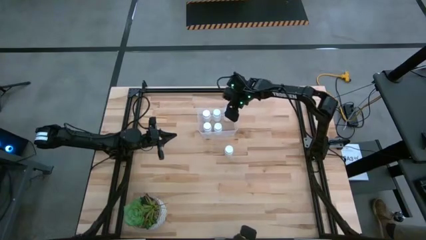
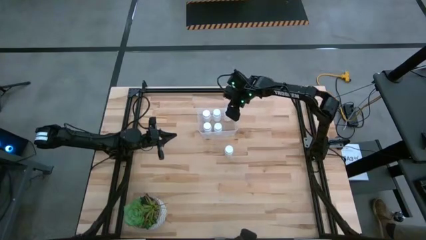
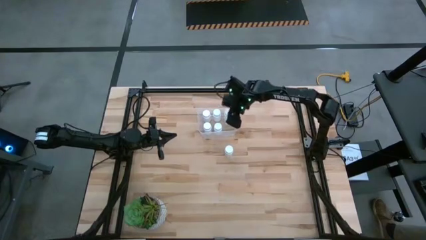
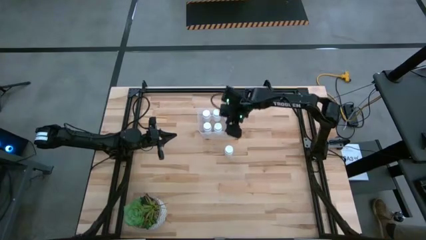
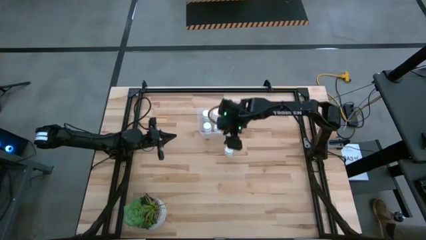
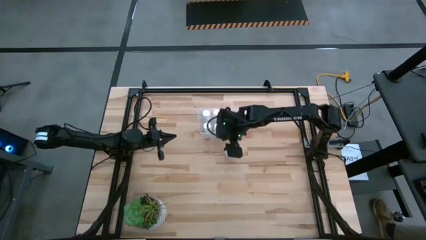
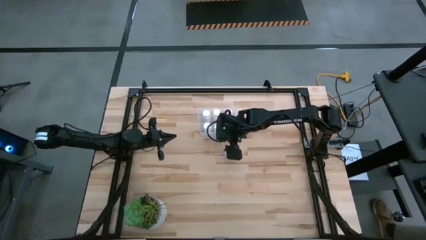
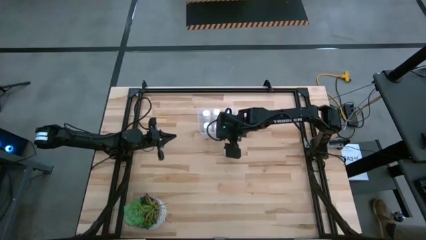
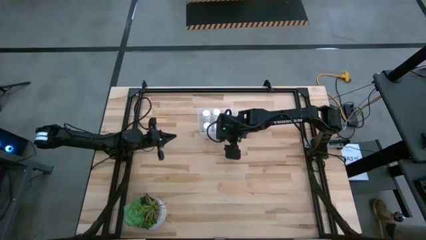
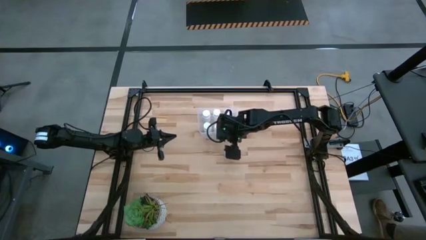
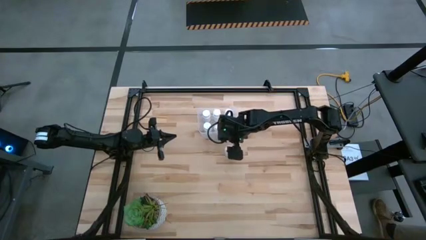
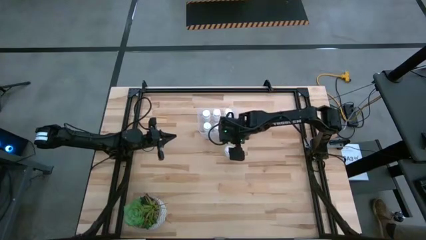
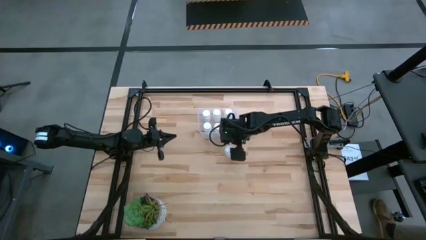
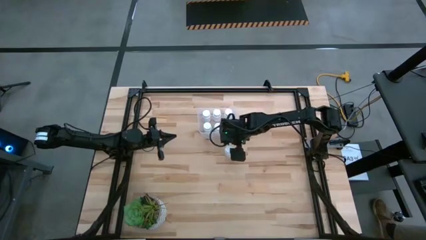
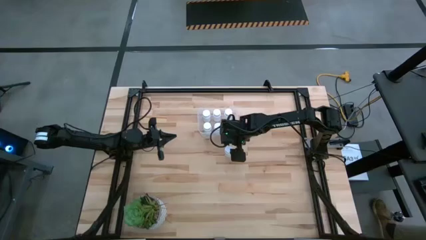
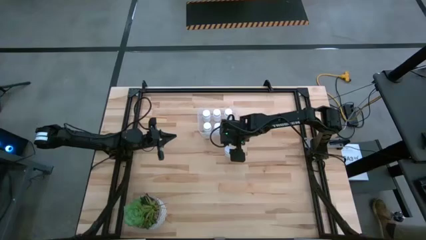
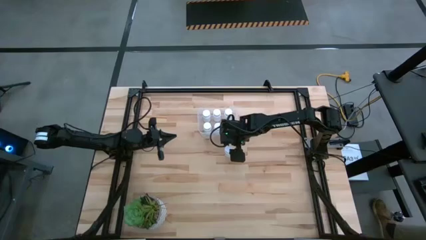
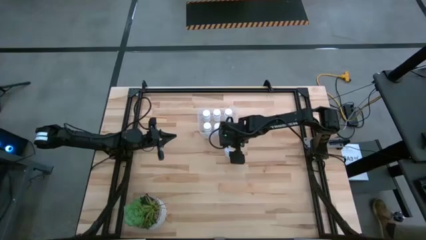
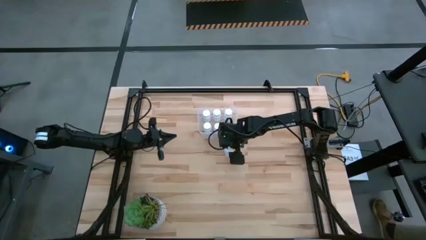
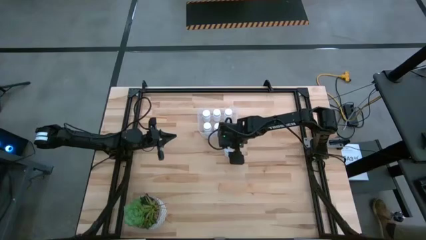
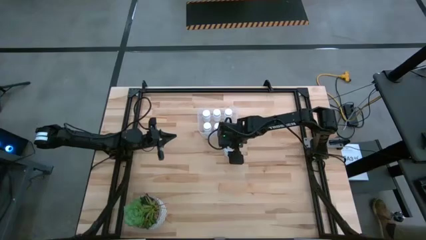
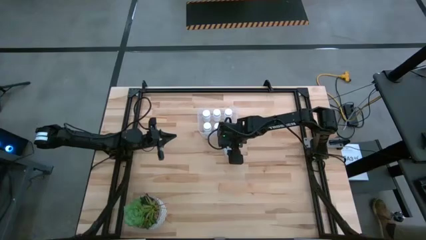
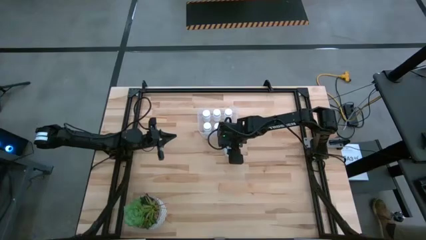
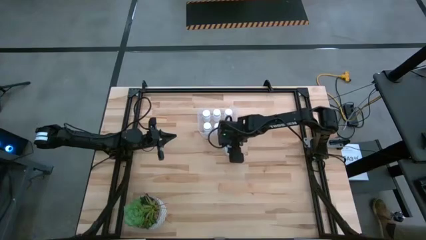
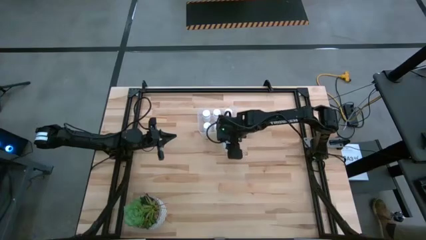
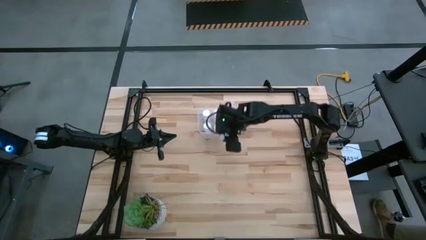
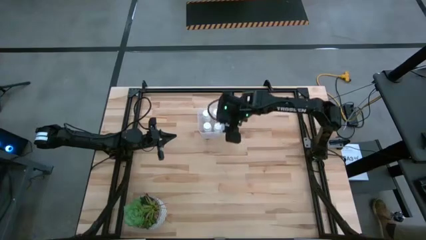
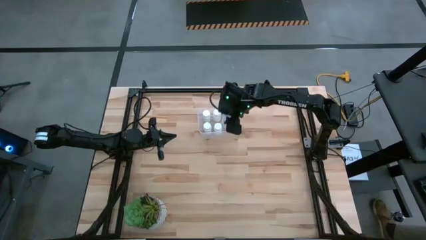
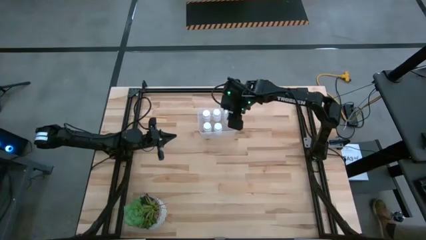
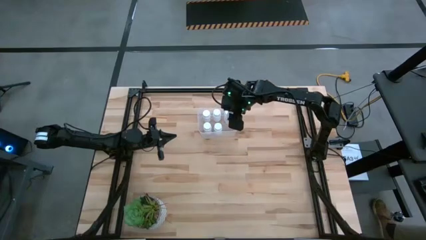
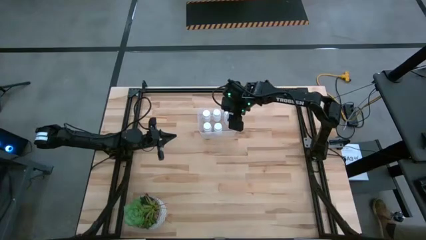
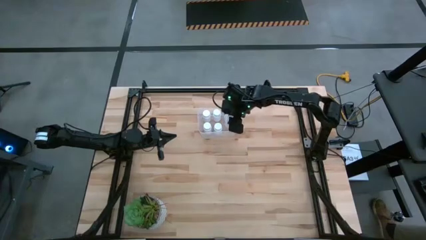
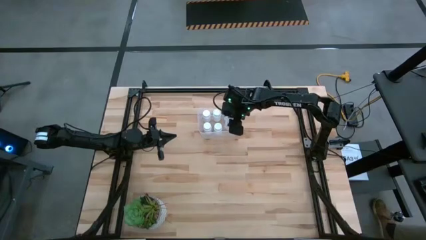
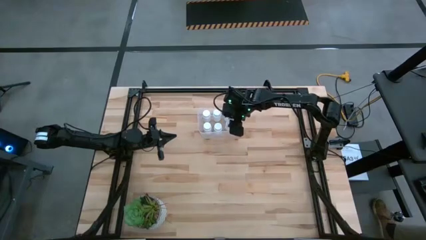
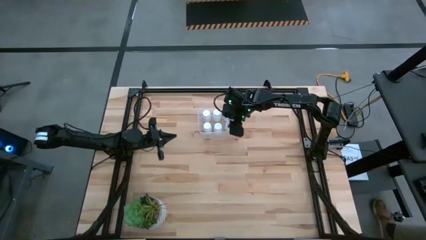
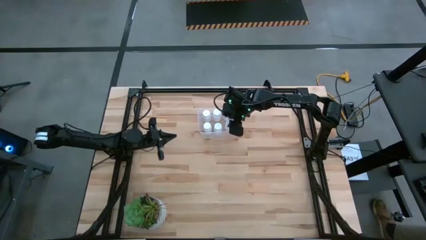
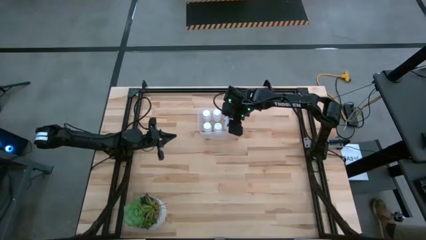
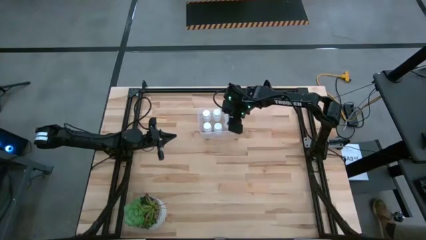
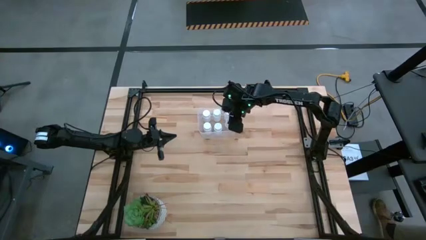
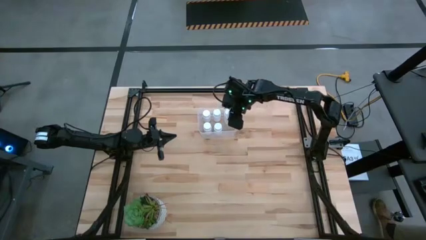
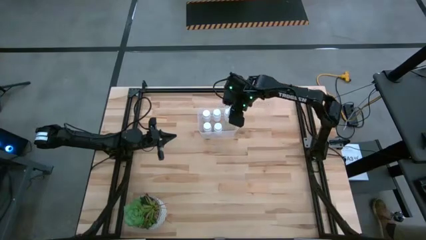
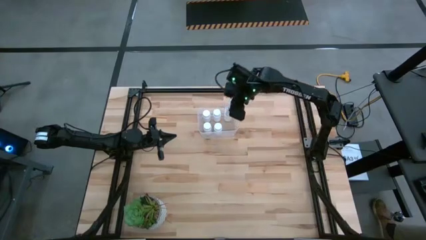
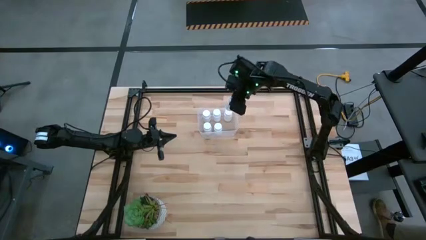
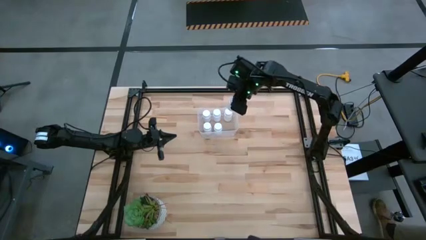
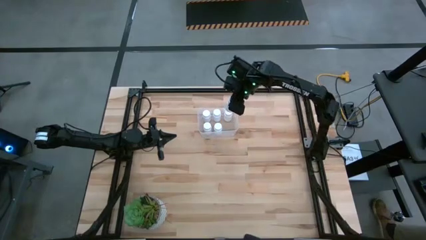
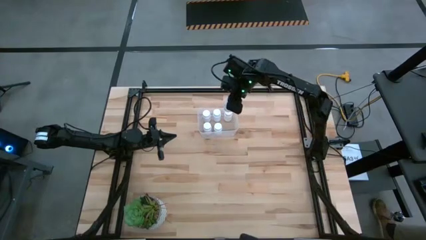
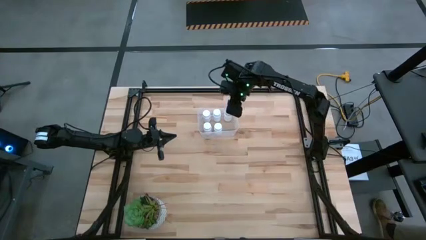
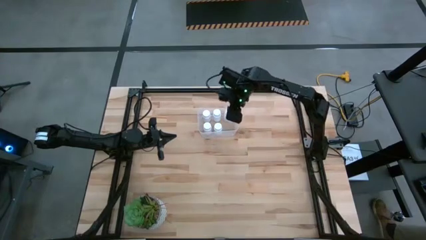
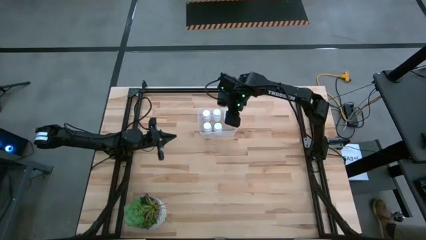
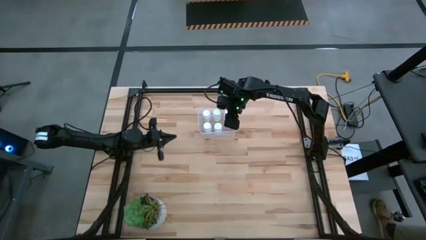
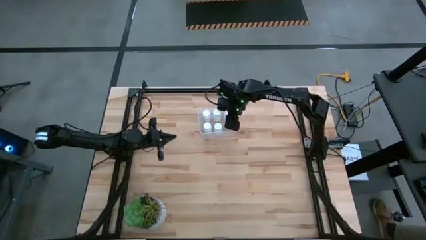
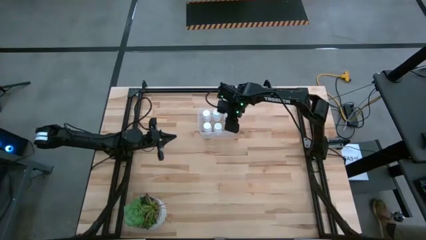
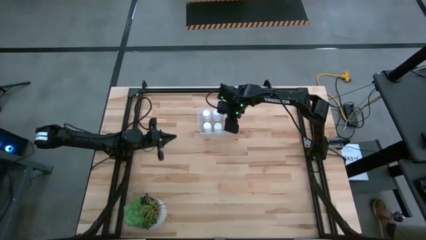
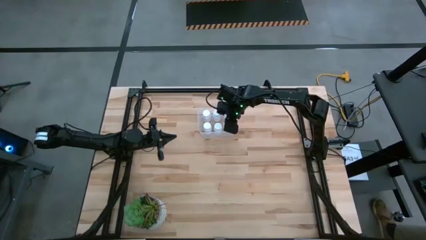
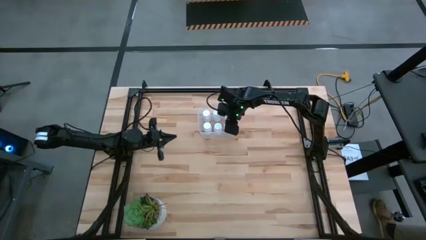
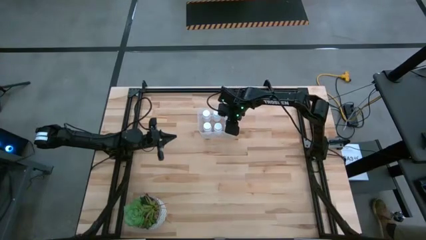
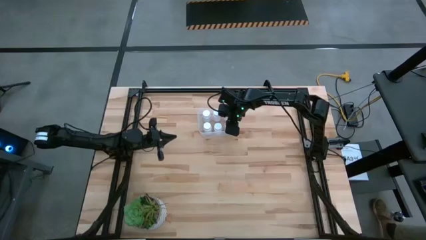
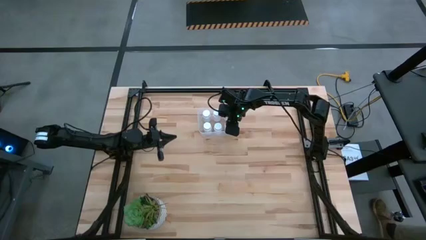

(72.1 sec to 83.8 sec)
Task: Pick and place pill bottles into a basket
Put the white pill bottle into the transparent bin

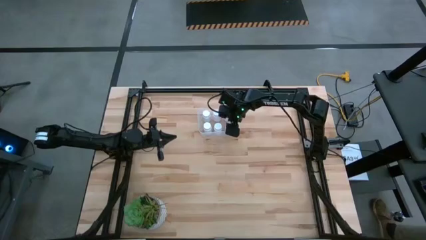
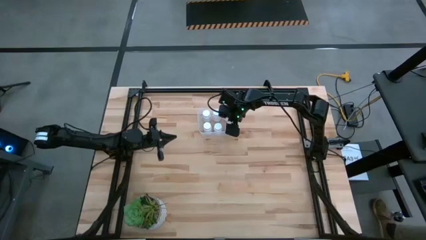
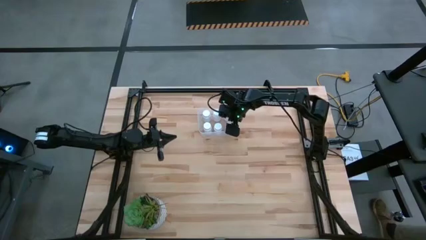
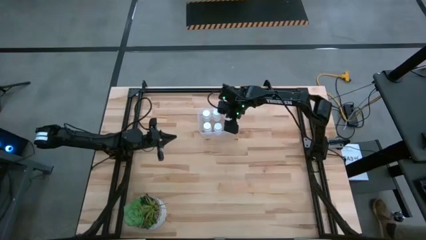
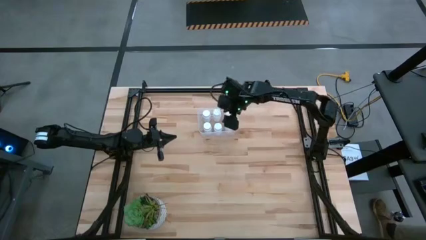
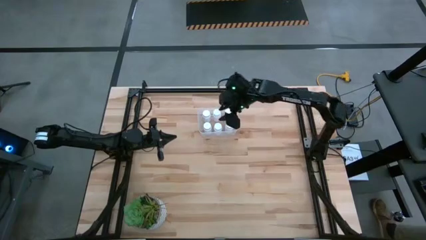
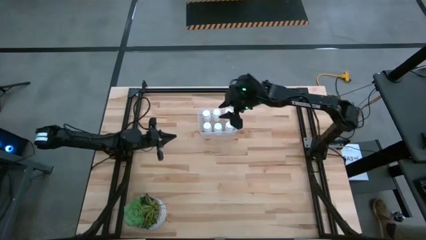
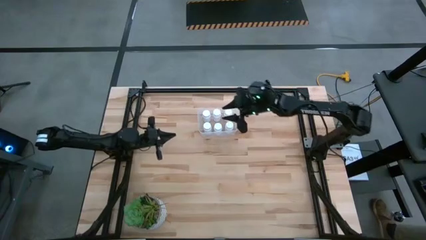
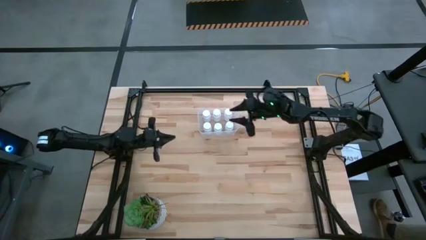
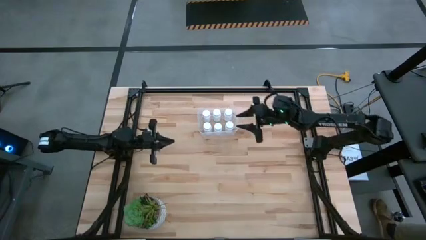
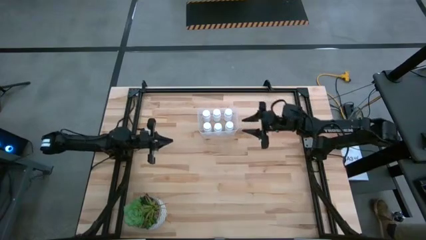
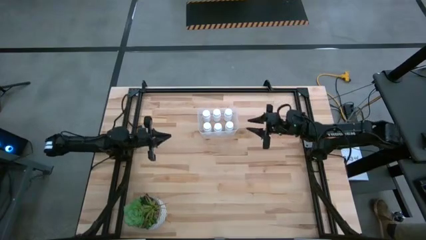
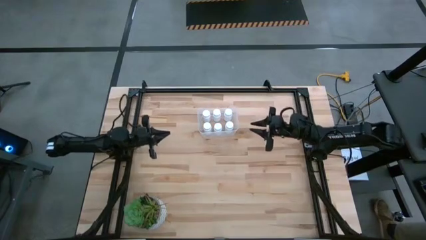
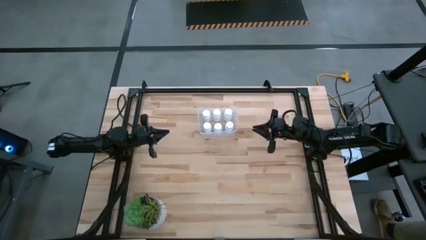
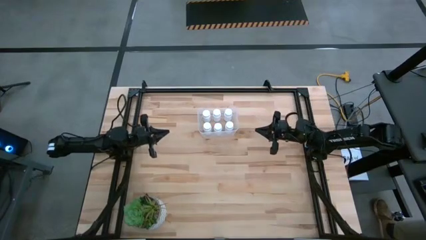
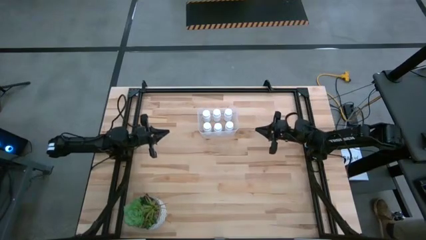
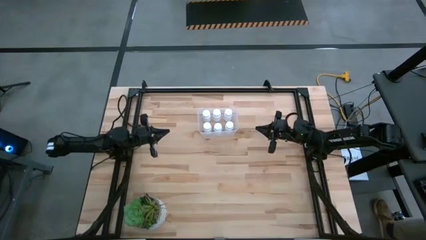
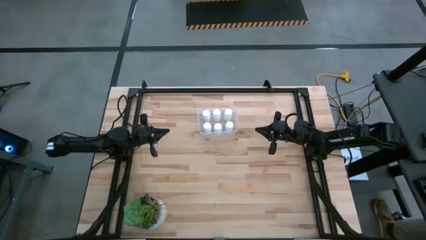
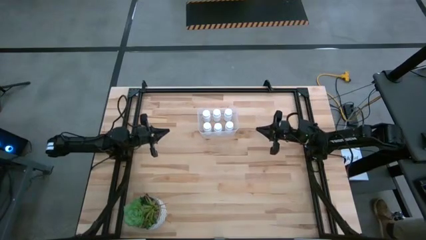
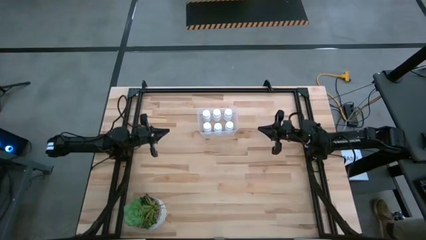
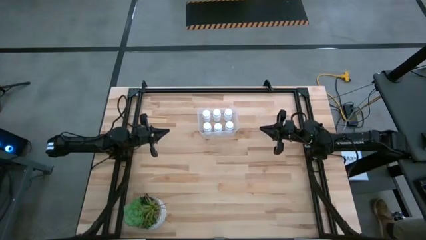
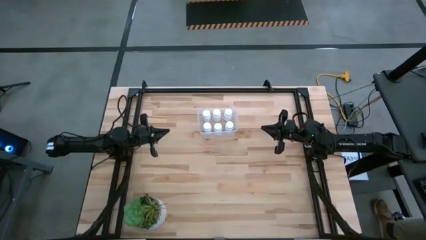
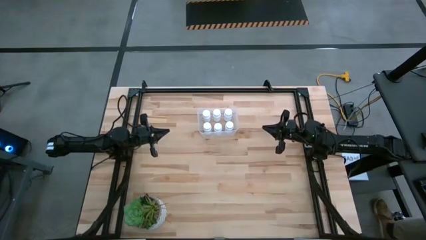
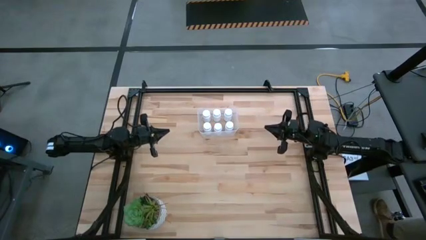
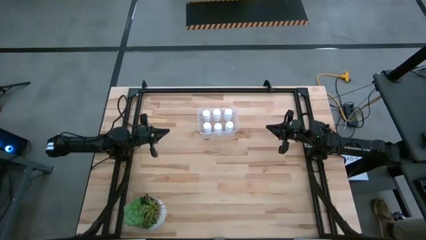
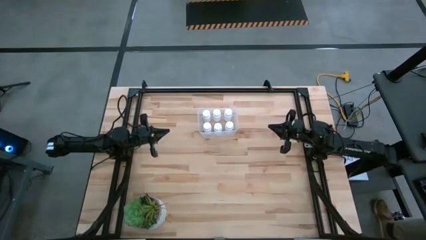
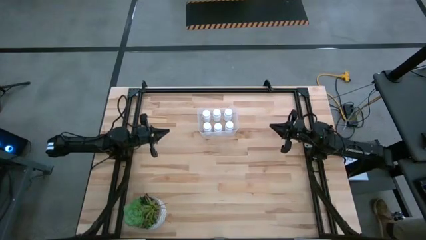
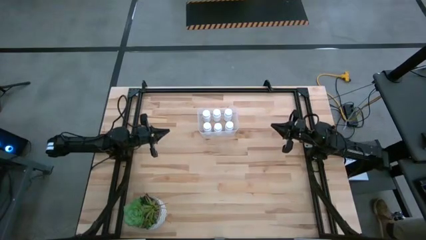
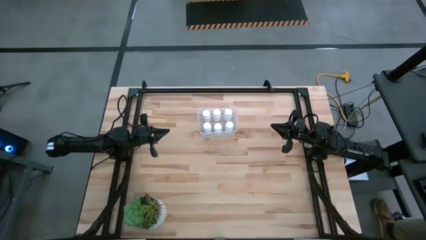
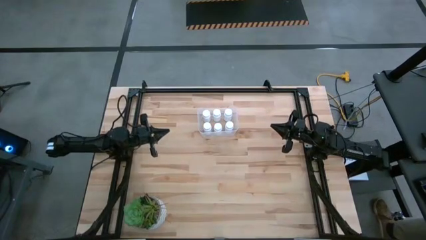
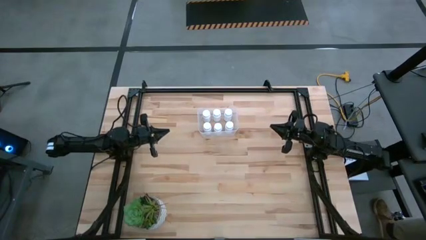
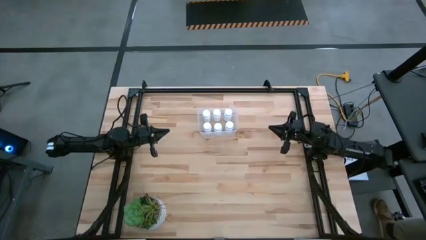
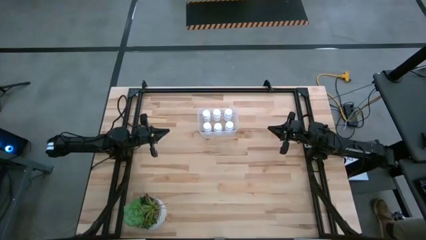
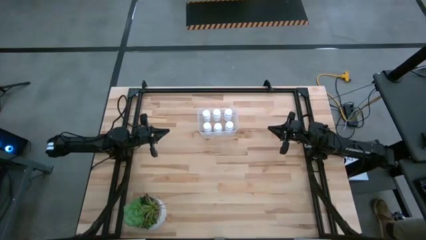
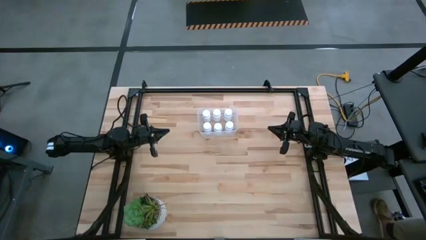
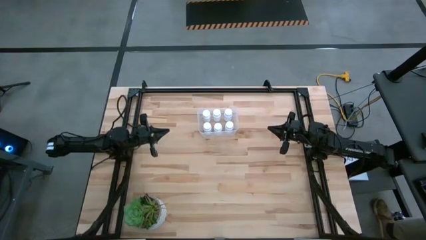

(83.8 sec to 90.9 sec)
Return to Home Position
